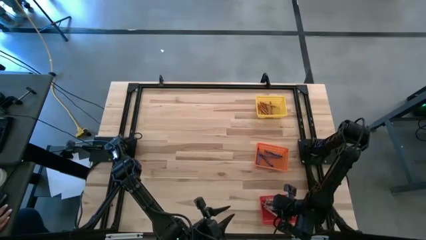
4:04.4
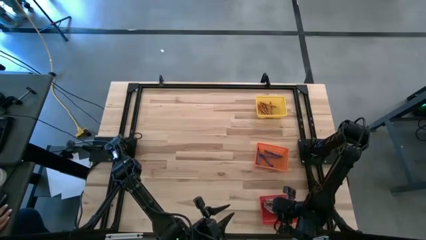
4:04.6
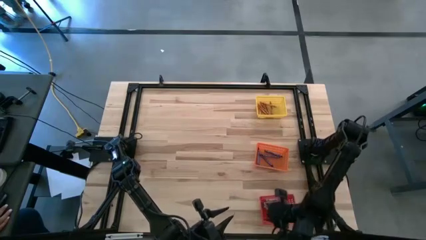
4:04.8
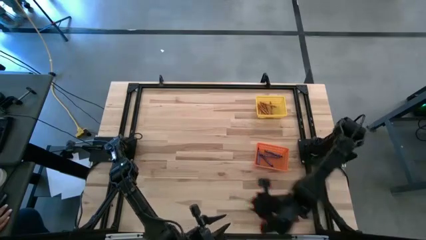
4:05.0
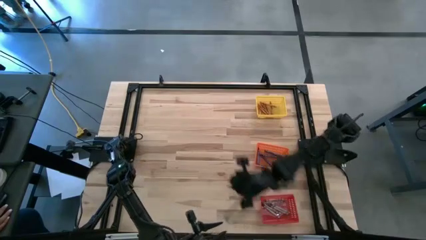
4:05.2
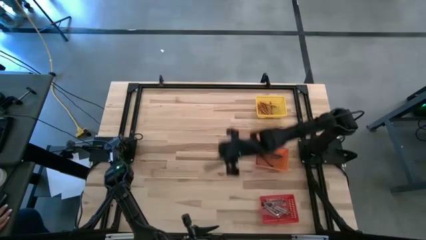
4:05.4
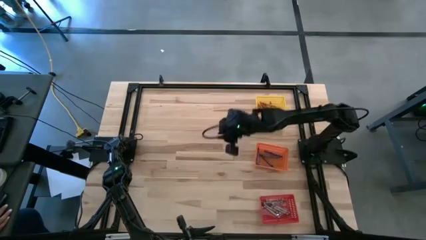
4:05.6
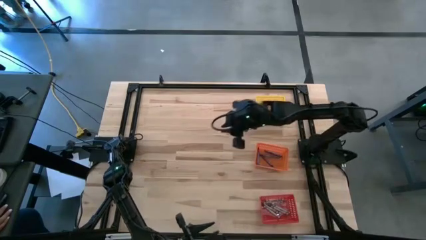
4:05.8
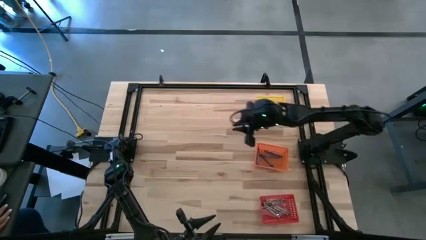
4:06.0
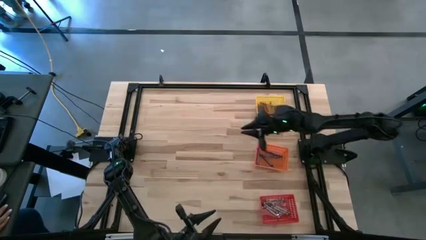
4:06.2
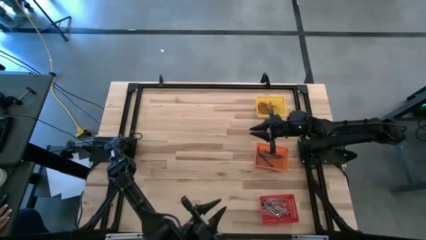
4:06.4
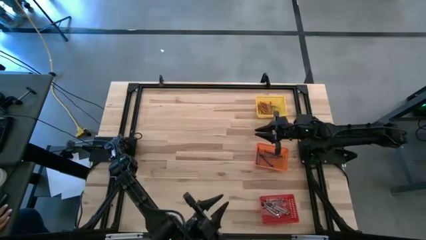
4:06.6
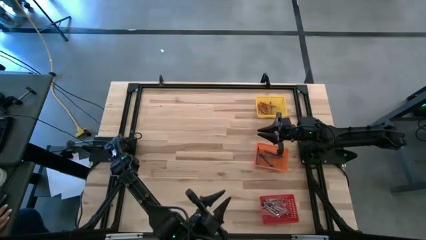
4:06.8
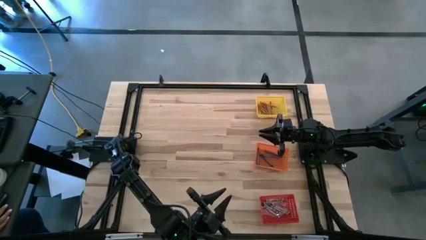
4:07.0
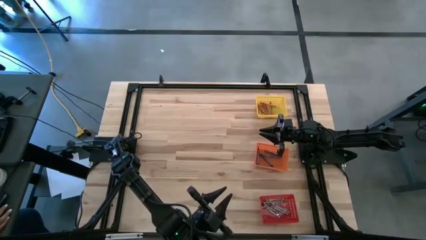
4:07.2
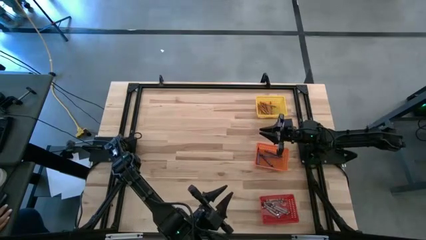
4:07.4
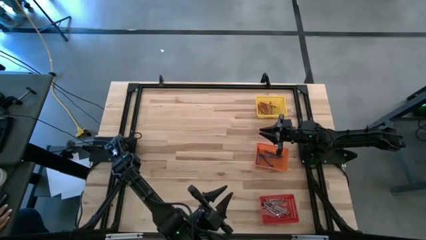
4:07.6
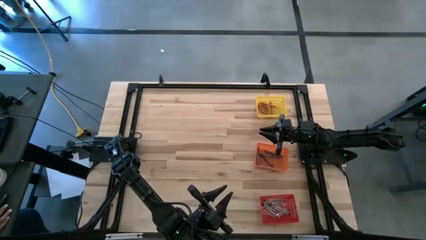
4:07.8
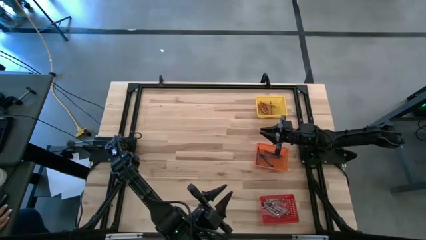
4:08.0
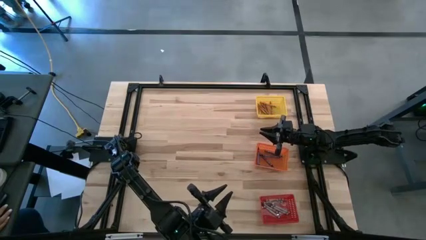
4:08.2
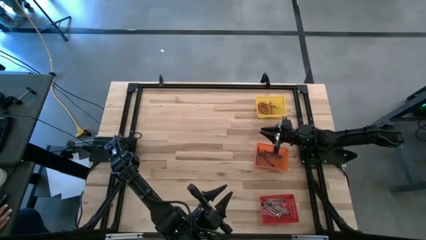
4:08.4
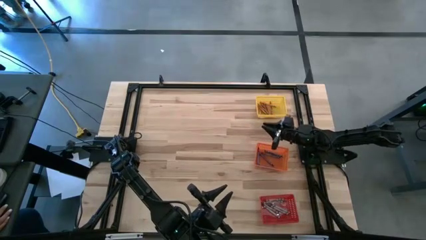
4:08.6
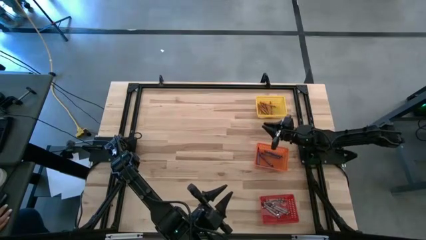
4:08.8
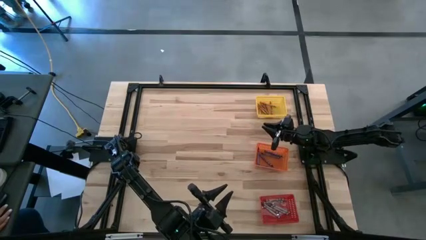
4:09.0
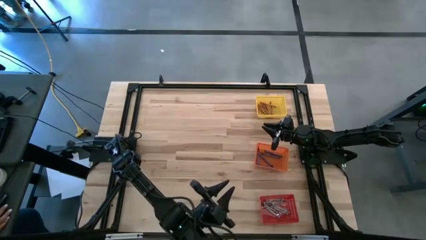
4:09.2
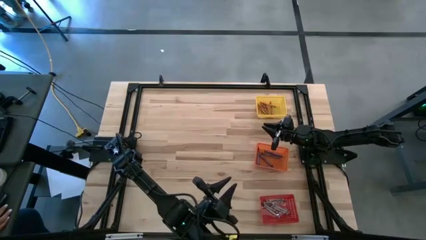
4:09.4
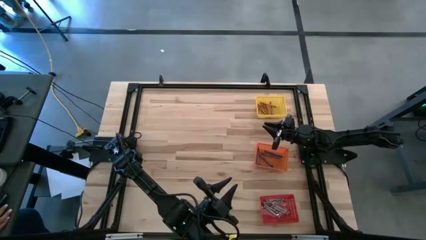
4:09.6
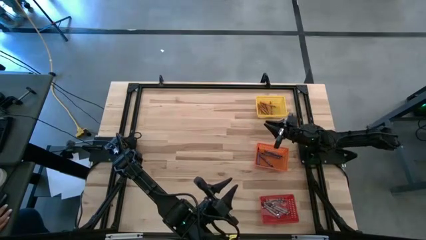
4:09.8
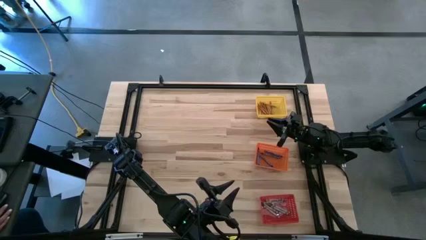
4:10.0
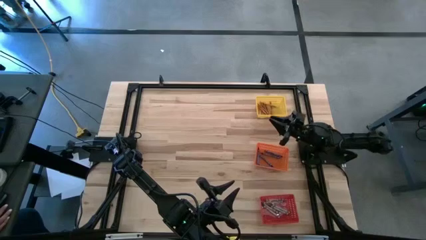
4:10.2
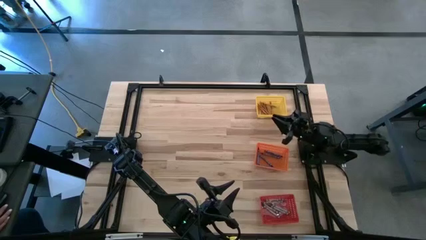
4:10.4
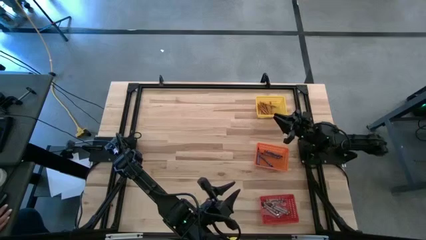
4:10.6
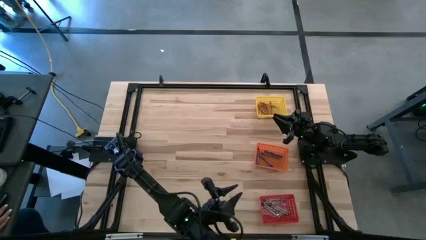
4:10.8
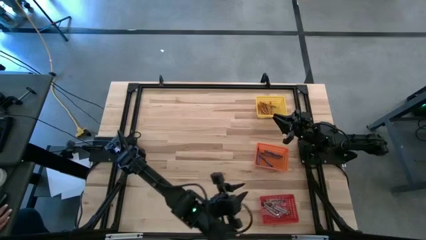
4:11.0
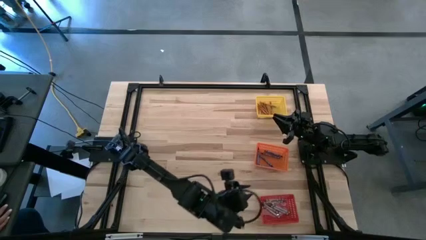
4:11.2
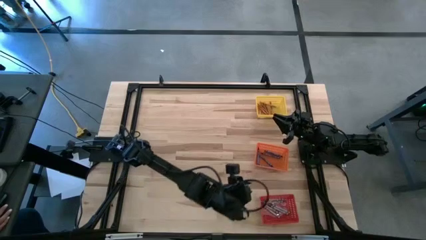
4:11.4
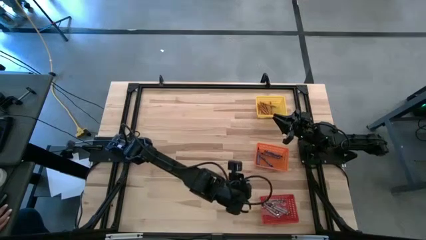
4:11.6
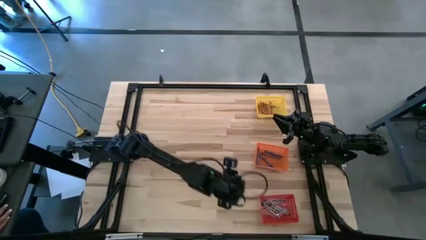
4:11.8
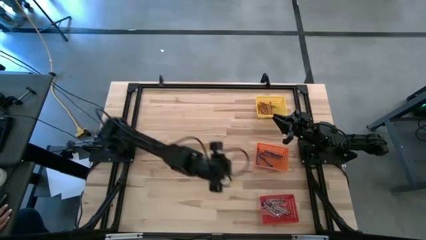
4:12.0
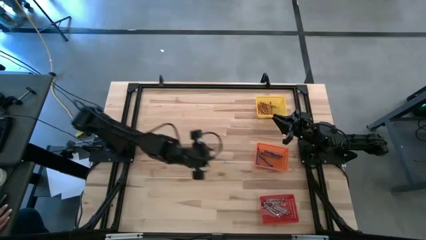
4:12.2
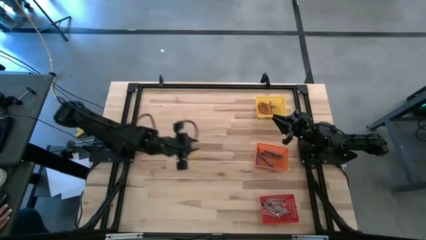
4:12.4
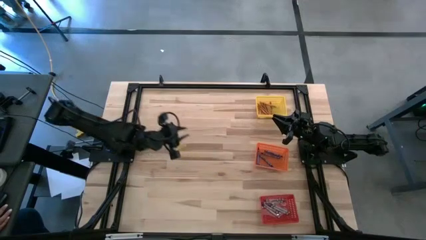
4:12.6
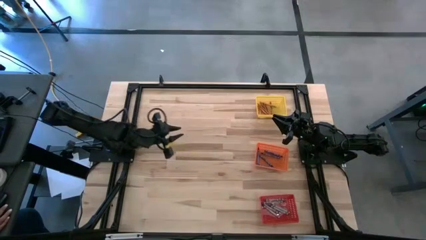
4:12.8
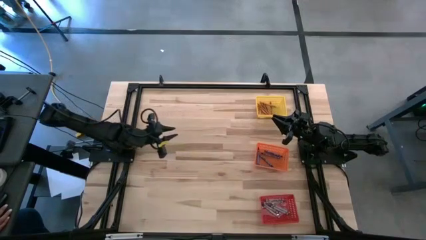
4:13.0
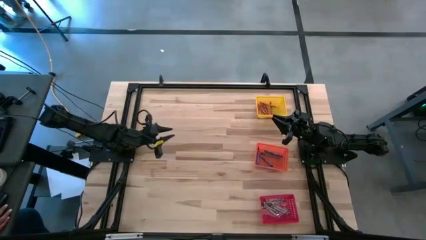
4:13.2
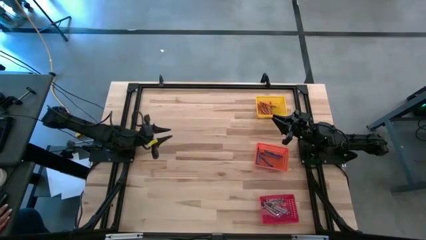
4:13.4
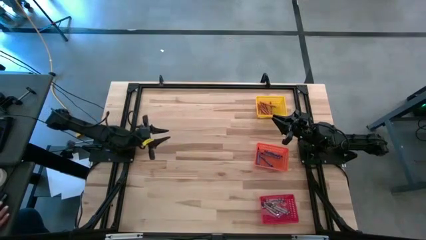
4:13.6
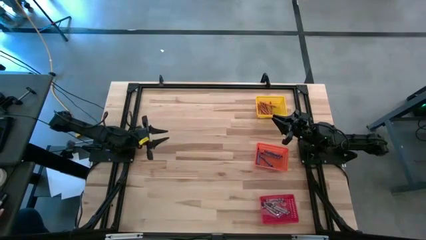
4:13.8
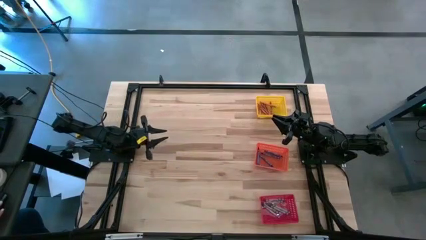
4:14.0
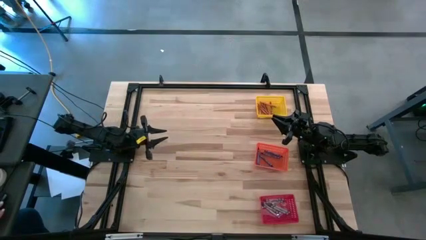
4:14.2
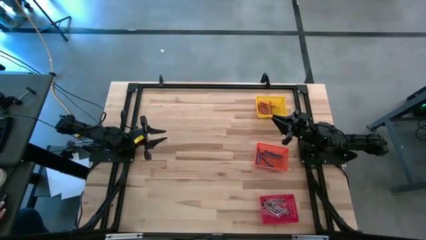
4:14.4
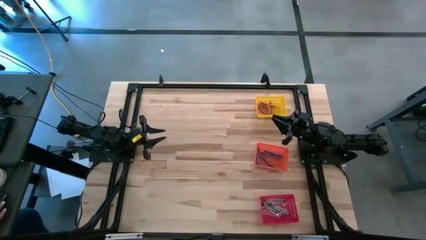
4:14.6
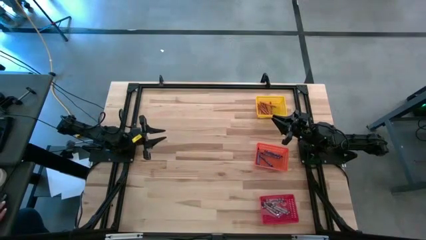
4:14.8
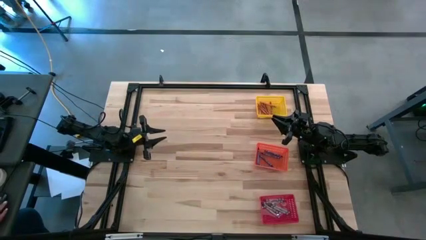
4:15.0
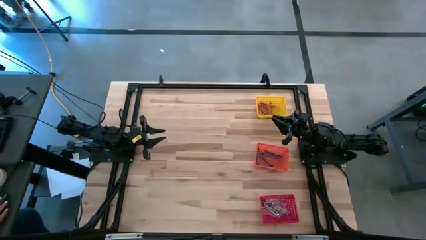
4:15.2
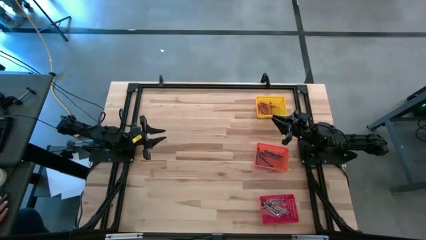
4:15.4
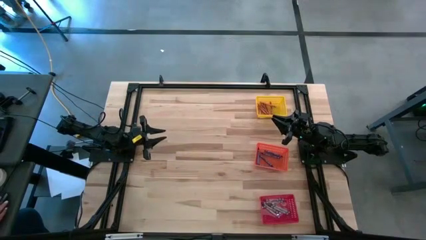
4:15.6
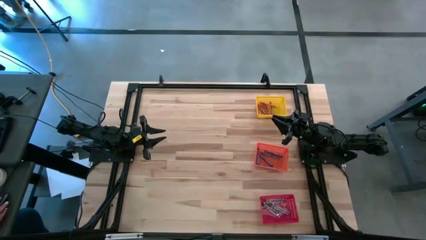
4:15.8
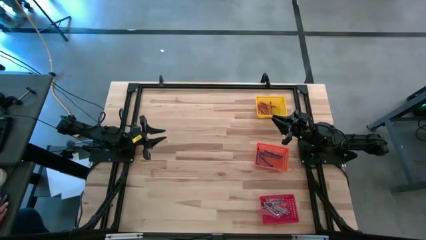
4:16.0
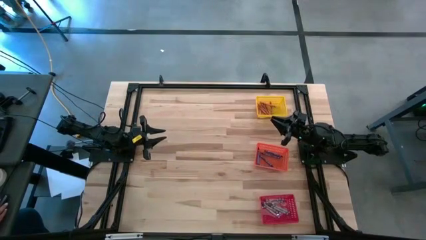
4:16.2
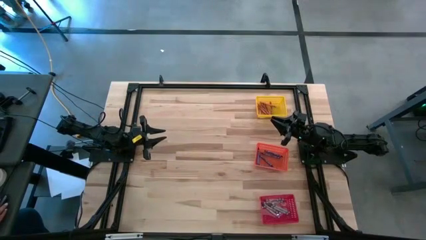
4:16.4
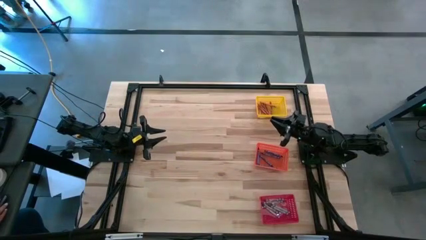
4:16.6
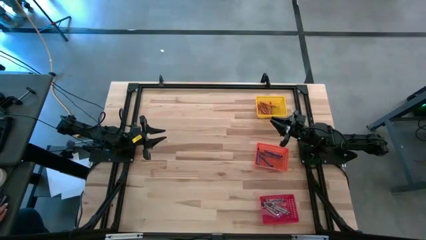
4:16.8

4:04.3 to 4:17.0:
Task: Sort crayons
Return to Home Position
